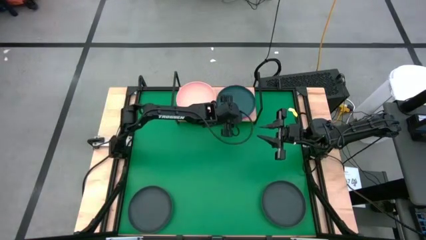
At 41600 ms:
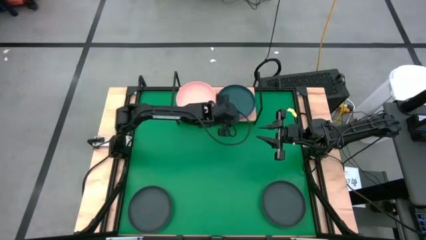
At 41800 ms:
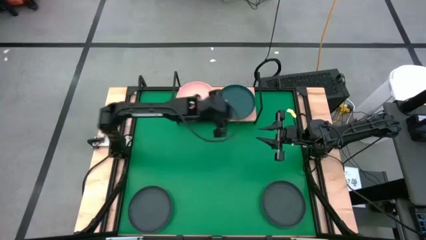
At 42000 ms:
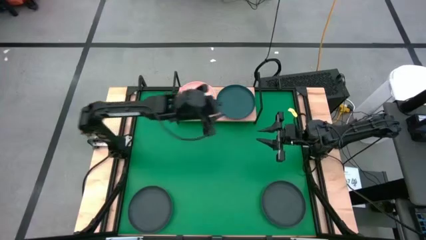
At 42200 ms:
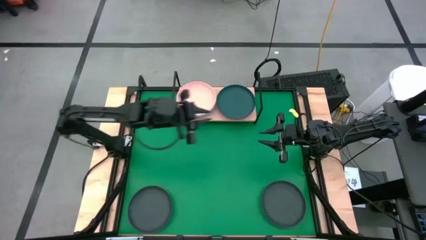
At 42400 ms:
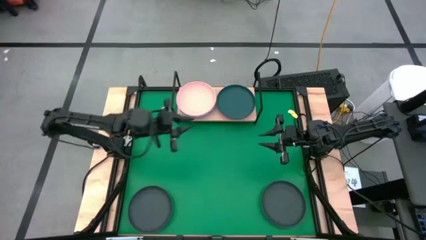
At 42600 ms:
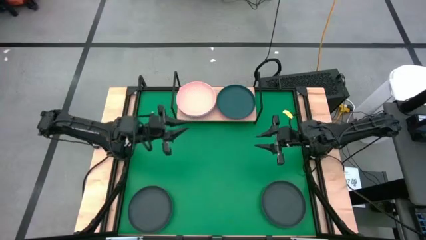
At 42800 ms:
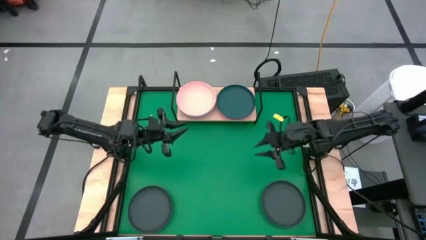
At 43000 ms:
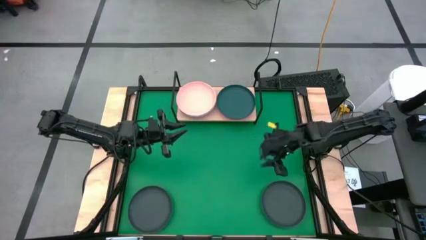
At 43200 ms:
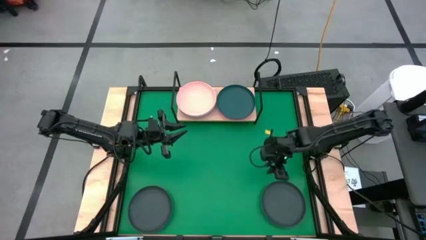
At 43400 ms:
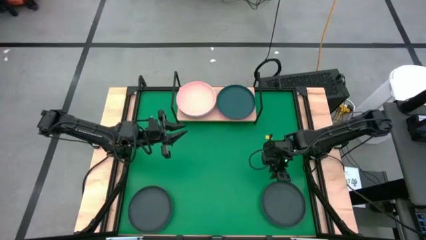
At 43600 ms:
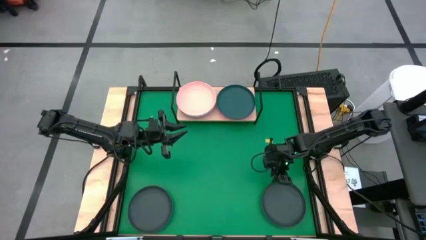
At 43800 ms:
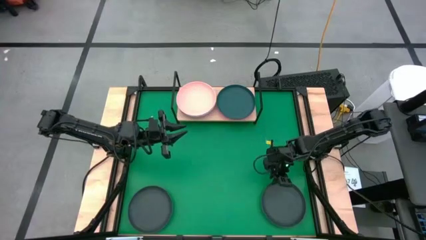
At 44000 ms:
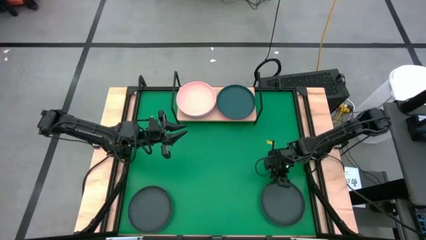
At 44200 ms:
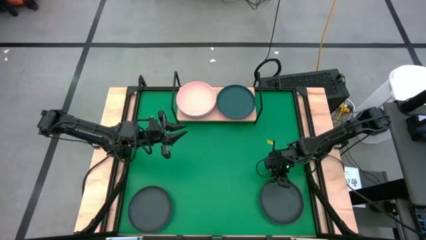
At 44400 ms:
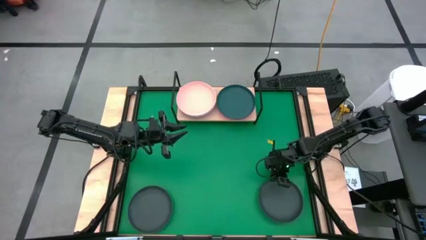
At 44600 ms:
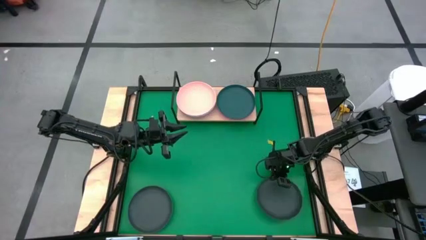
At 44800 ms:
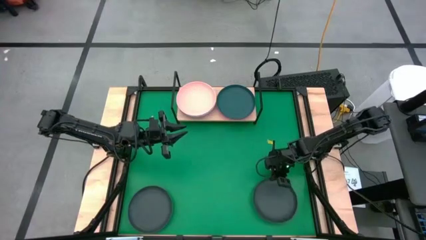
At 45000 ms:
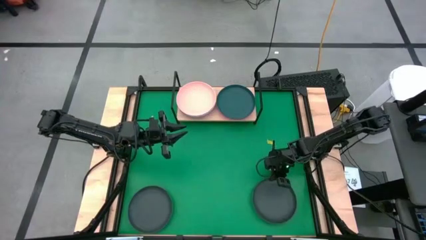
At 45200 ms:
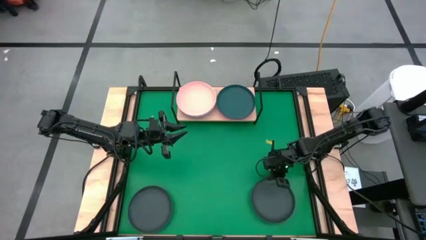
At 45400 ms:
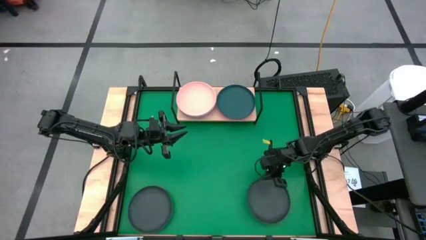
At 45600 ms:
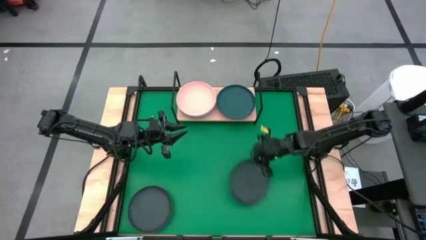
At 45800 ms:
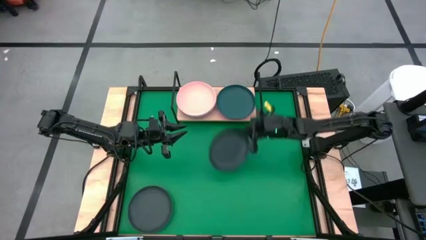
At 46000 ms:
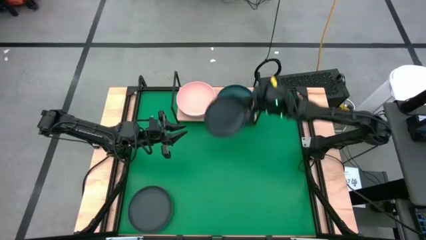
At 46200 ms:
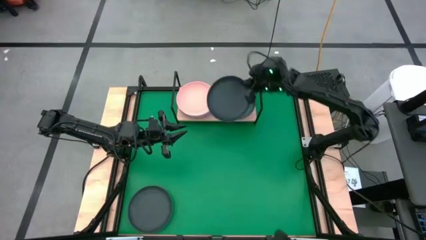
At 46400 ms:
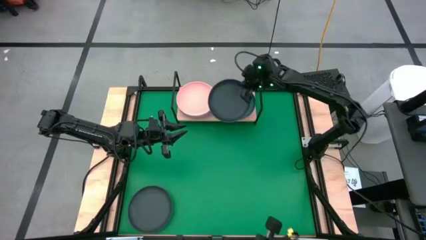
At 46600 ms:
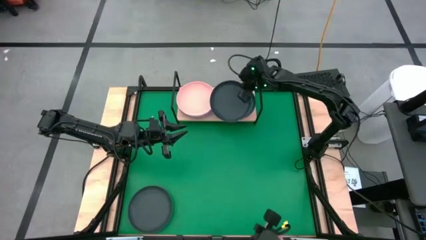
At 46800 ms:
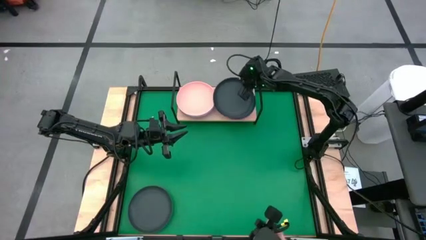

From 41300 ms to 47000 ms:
Task: Place and stack plates onto a shelf
Stack the right black plate on top of the dark green plate on the shelf

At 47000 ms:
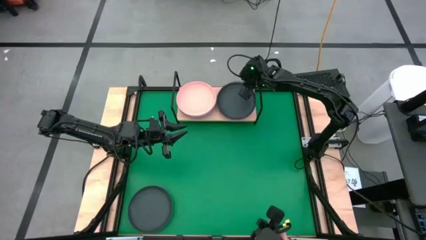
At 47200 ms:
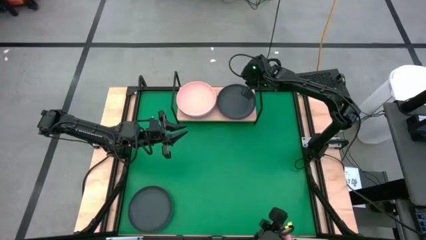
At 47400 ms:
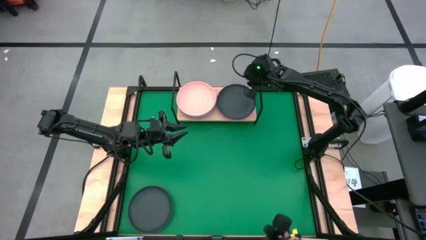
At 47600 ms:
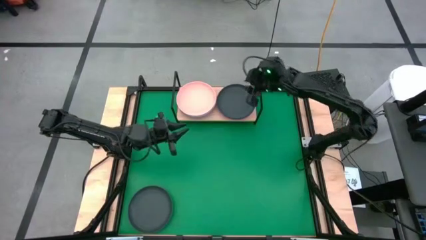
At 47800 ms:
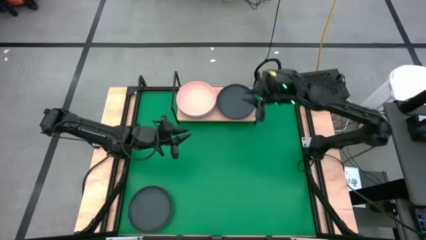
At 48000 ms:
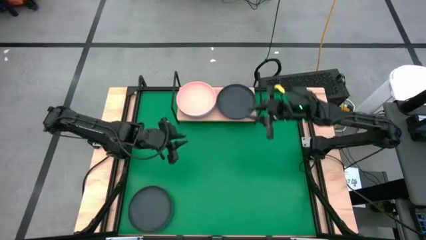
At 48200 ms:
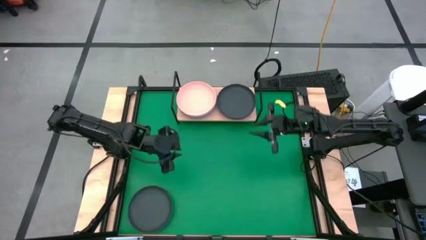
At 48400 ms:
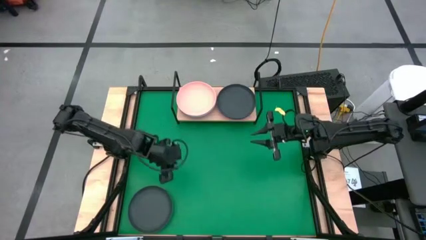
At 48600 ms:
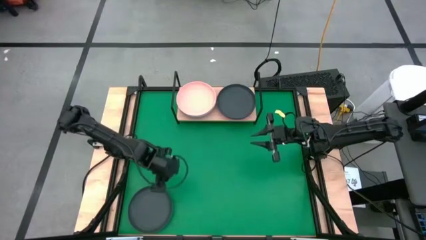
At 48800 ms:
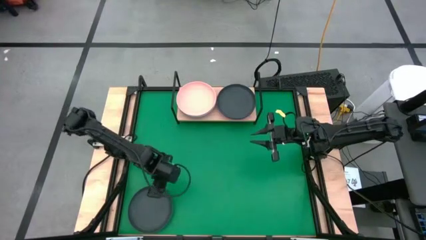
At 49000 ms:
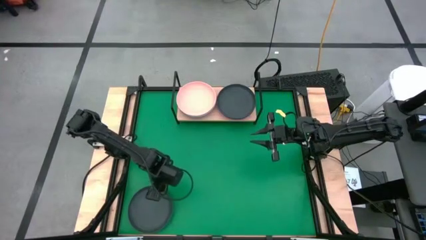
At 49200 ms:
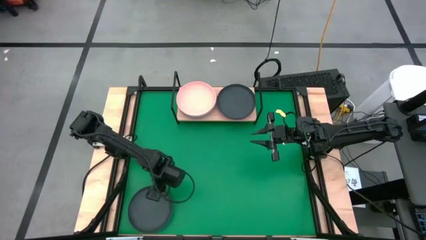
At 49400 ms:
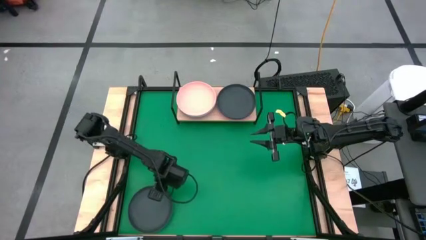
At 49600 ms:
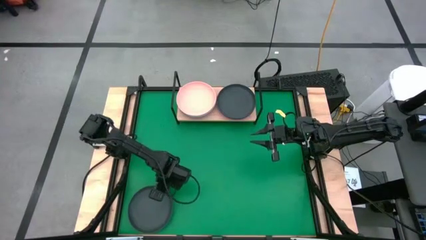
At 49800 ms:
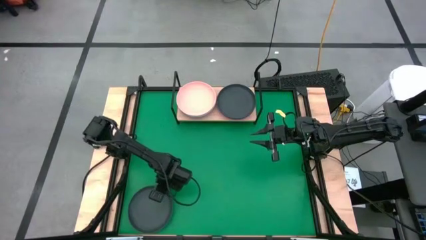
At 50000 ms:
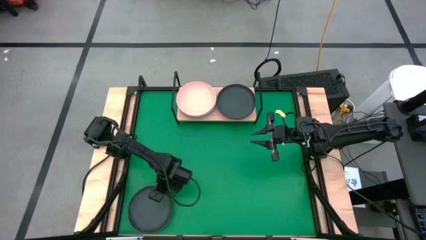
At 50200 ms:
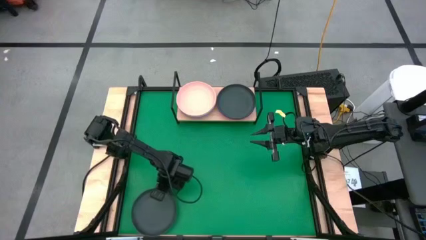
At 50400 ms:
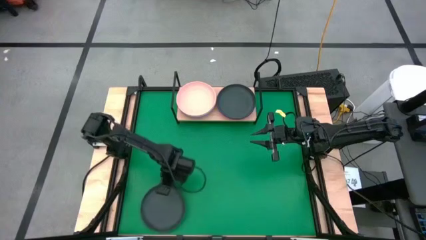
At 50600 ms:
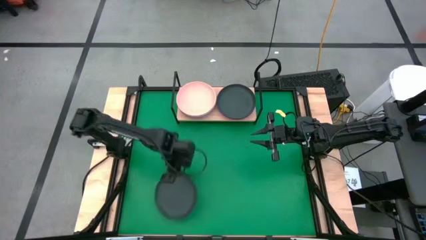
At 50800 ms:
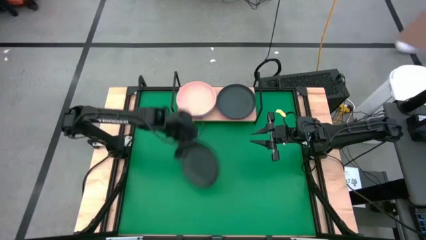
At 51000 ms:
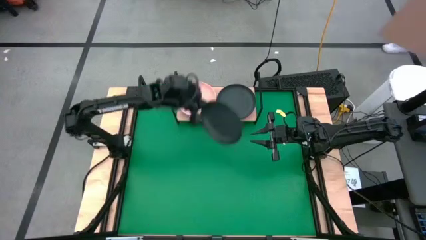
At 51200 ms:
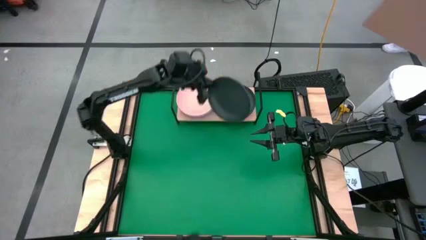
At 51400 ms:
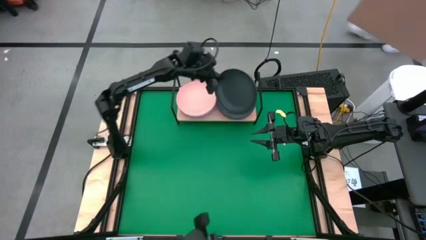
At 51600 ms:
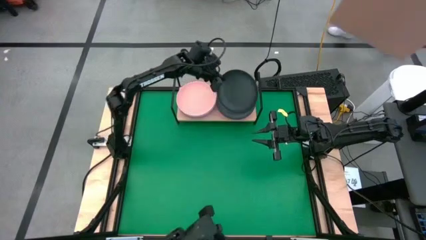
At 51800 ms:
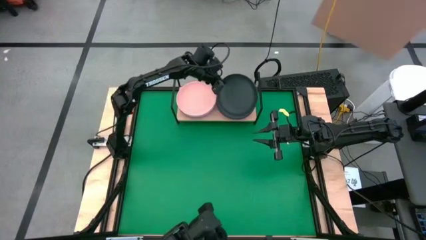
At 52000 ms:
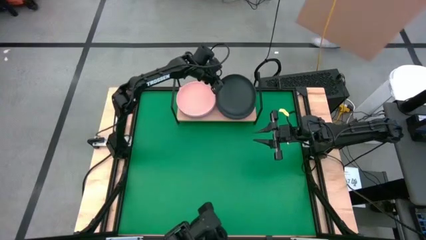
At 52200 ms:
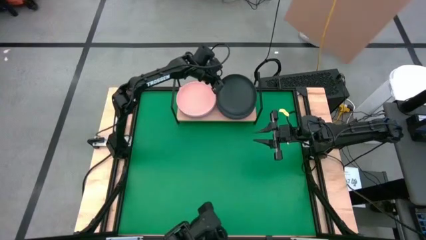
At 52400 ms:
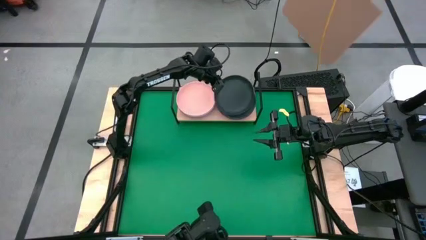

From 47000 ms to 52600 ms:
Stack the black plate on top of the other black plate on the shelf

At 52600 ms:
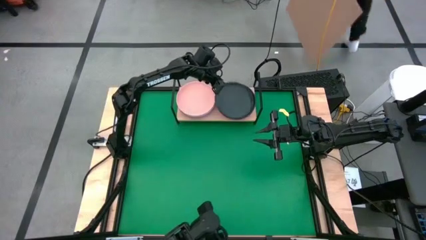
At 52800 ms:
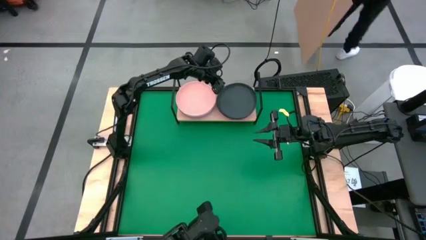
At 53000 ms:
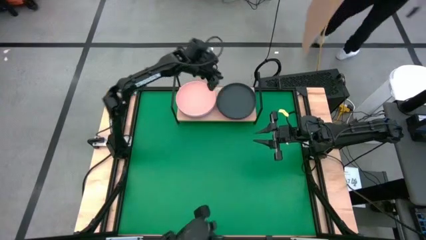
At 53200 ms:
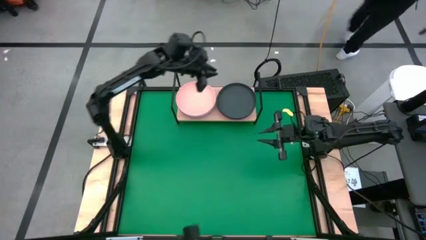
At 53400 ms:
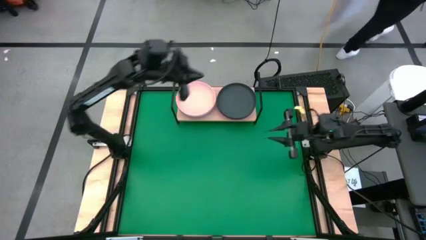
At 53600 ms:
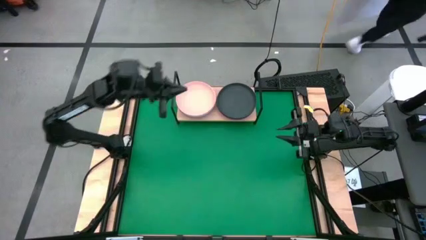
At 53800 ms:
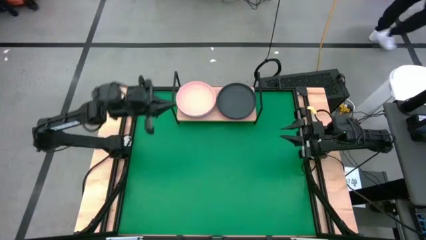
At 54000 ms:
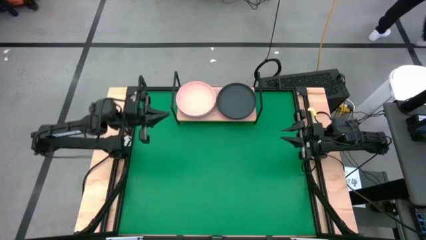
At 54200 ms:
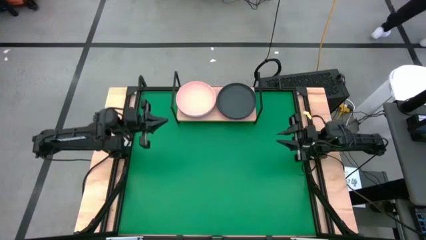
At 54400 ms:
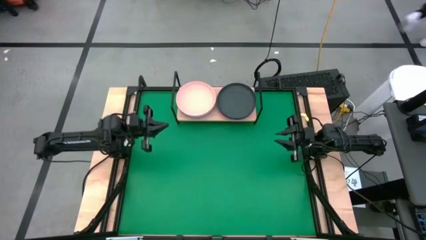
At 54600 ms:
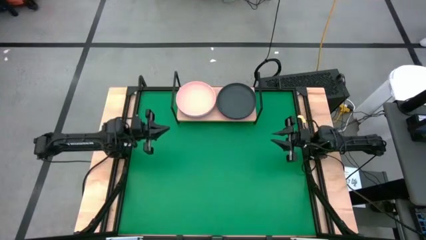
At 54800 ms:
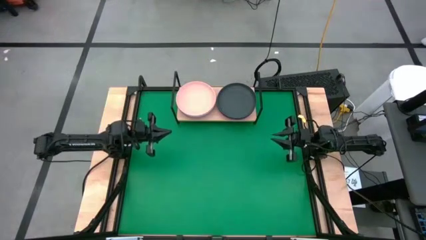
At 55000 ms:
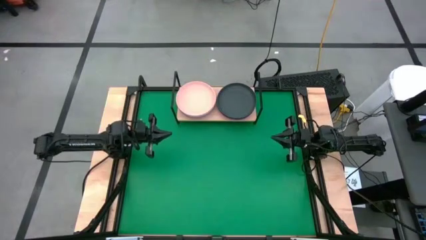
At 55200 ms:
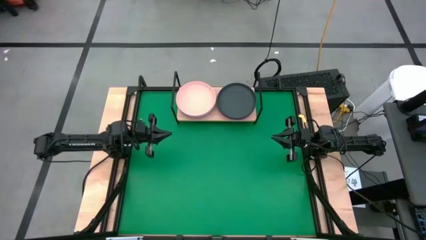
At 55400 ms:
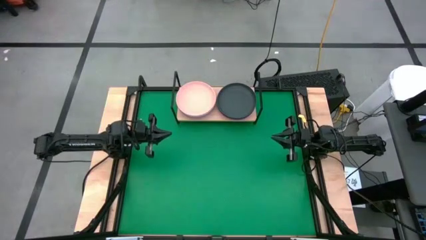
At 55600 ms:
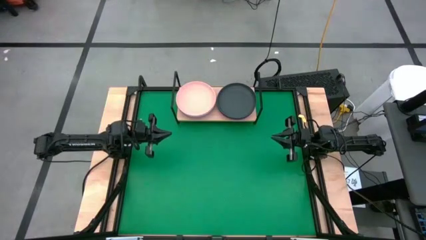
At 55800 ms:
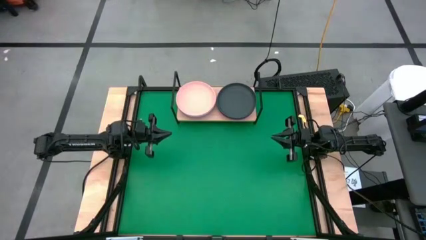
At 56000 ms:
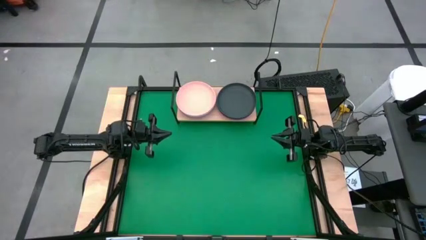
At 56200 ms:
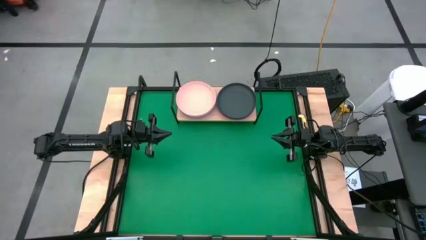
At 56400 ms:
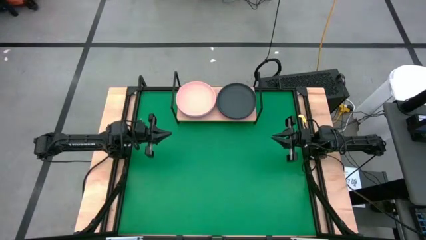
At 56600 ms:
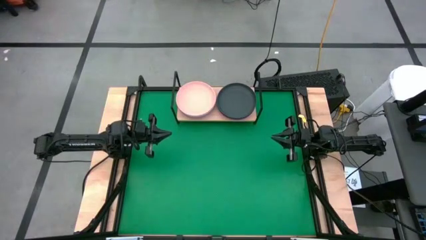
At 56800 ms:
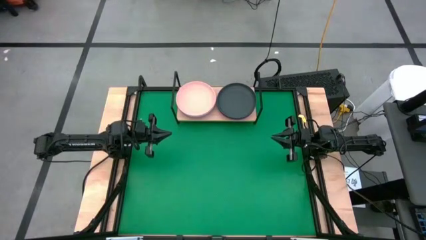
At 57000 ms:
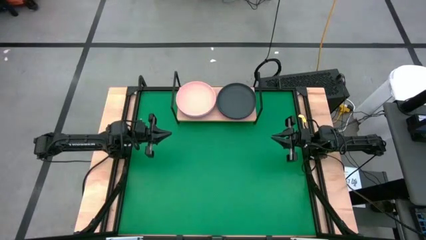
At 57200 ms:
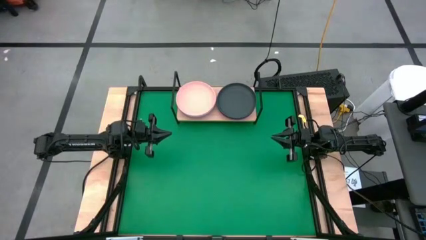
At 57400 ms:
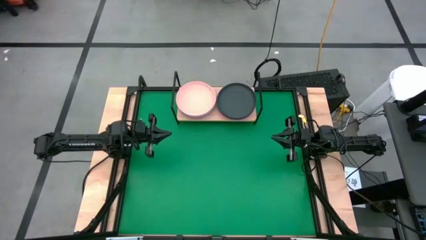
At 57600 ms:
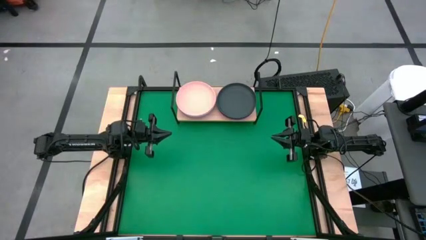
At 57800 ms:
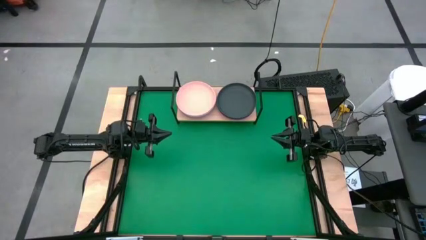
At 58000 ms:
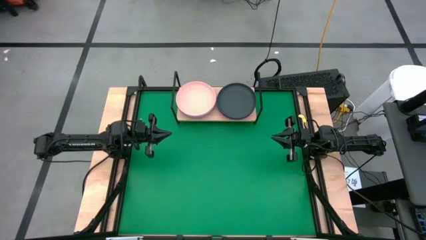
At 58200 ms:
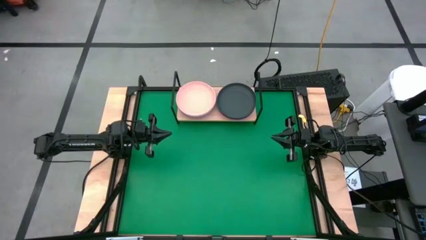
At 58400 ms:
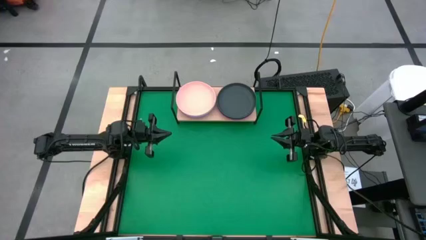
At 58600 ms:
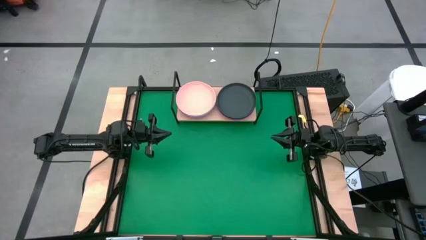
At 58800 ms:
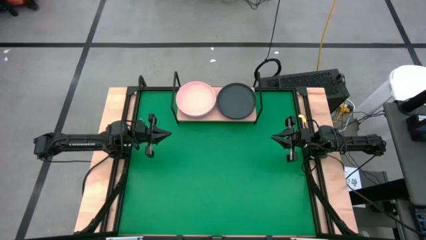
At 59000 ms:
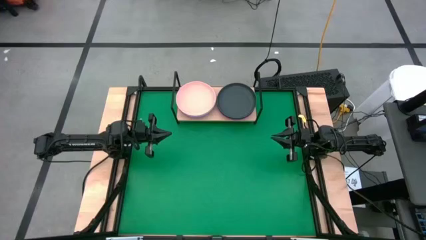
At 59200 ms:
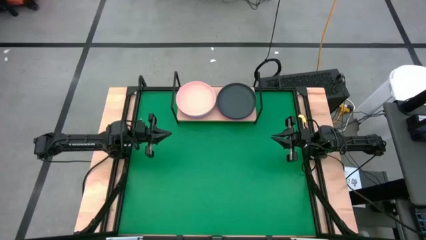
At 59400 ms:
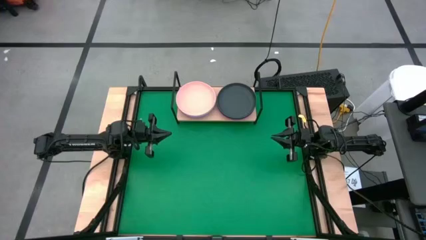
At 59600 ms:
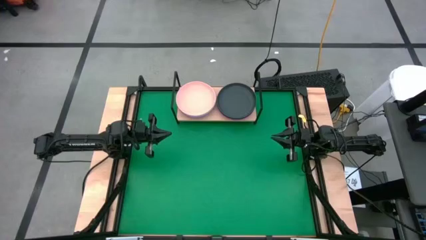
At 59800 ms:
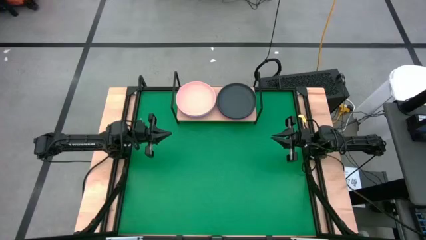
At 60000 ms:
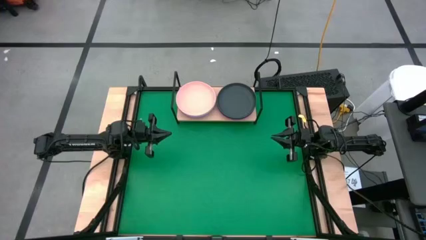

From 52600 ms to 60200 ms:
Return to Home Position
